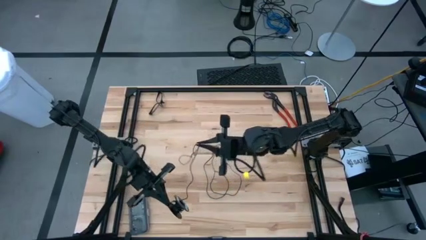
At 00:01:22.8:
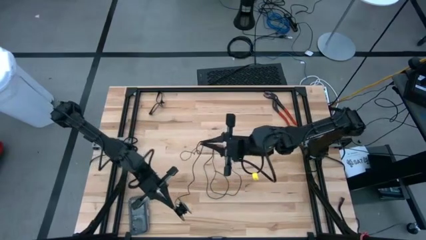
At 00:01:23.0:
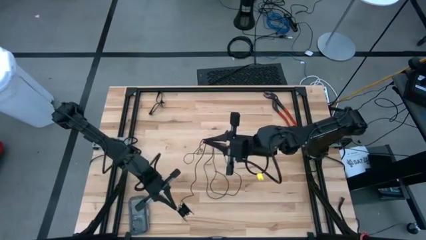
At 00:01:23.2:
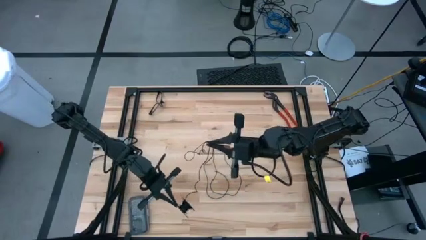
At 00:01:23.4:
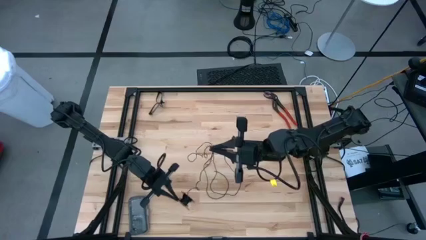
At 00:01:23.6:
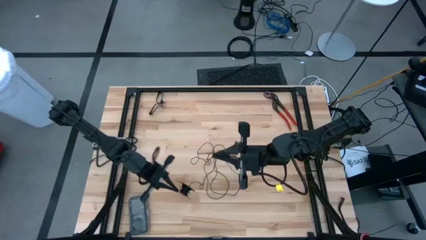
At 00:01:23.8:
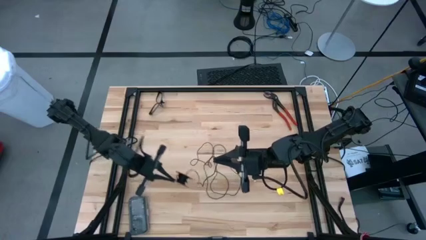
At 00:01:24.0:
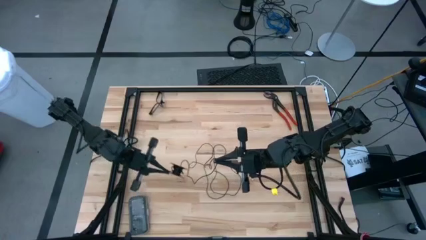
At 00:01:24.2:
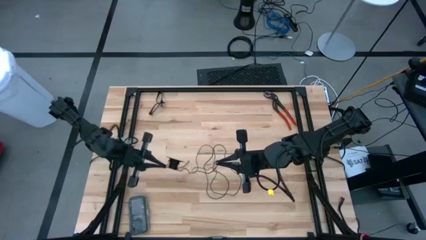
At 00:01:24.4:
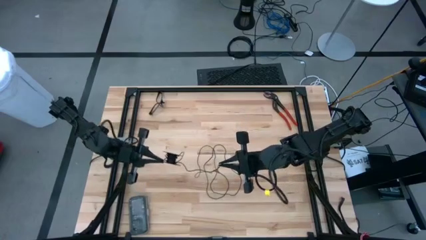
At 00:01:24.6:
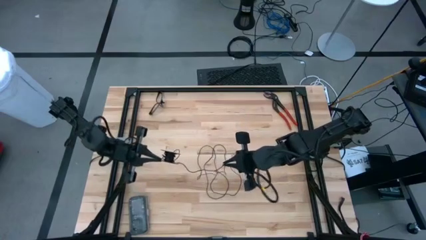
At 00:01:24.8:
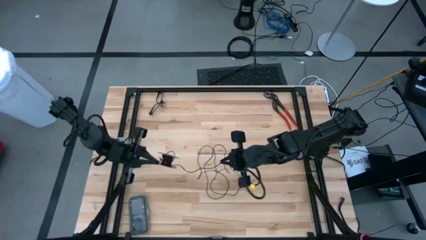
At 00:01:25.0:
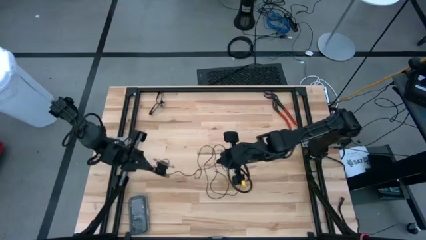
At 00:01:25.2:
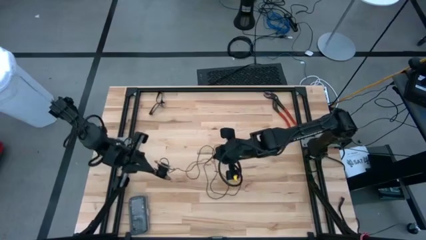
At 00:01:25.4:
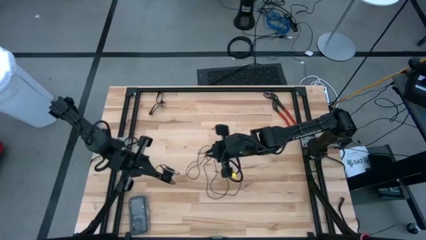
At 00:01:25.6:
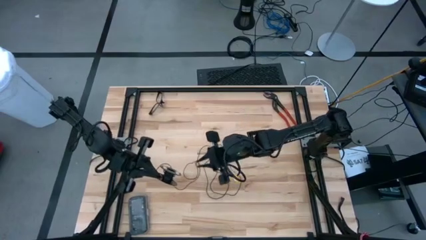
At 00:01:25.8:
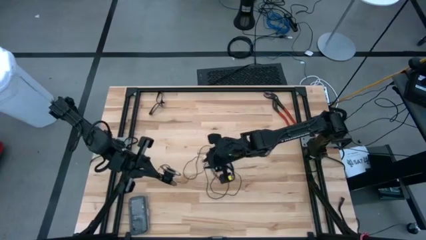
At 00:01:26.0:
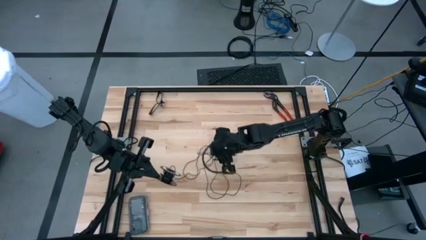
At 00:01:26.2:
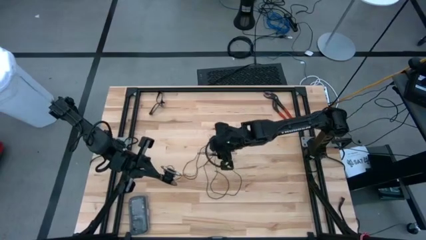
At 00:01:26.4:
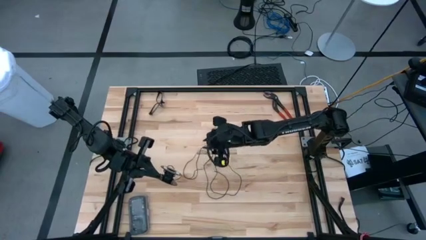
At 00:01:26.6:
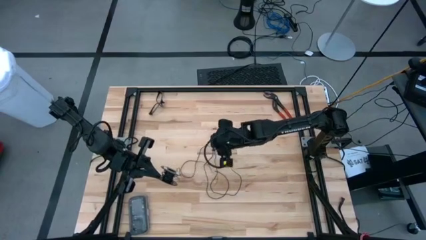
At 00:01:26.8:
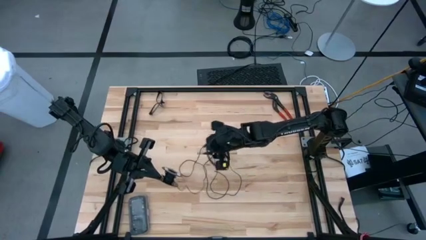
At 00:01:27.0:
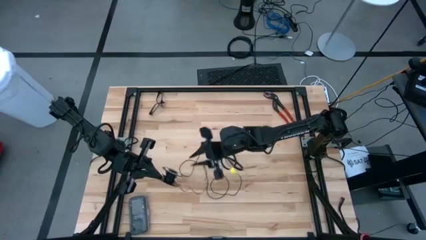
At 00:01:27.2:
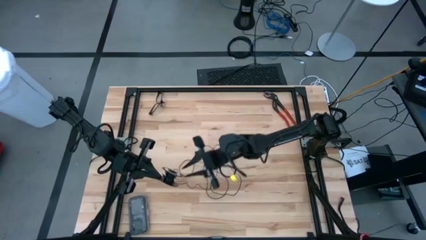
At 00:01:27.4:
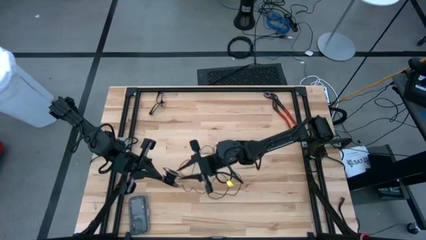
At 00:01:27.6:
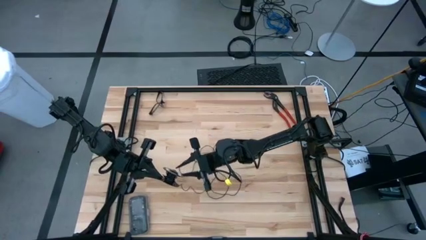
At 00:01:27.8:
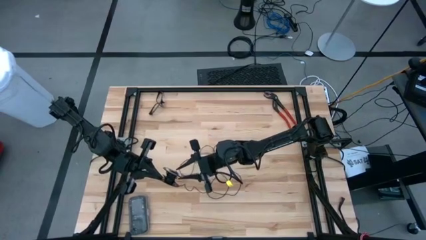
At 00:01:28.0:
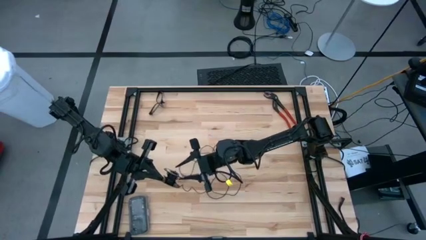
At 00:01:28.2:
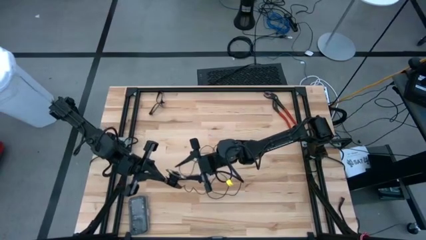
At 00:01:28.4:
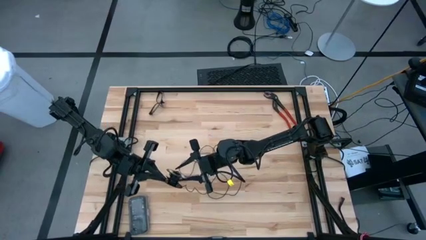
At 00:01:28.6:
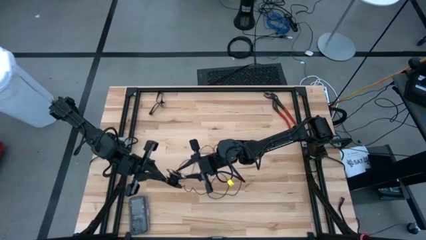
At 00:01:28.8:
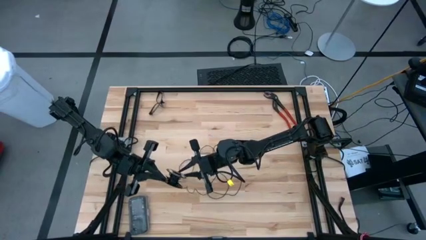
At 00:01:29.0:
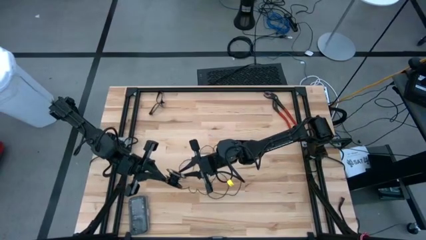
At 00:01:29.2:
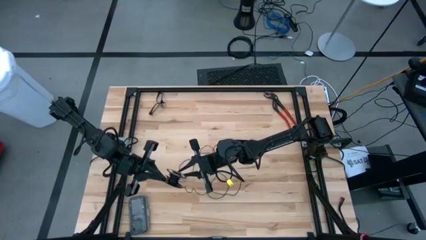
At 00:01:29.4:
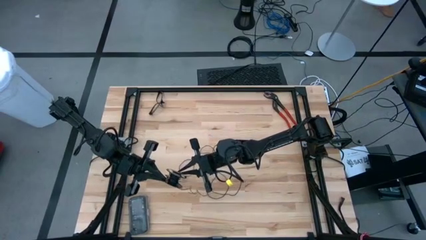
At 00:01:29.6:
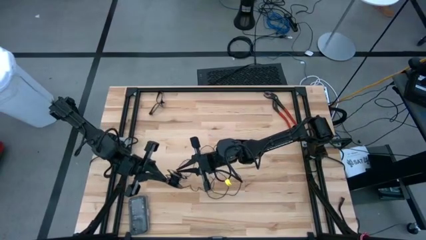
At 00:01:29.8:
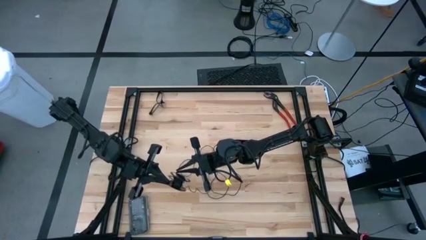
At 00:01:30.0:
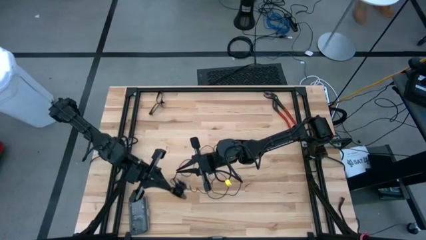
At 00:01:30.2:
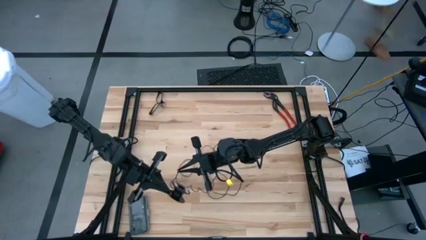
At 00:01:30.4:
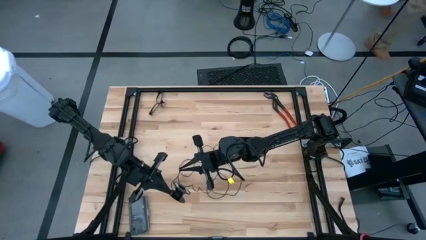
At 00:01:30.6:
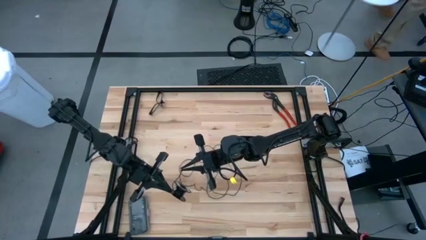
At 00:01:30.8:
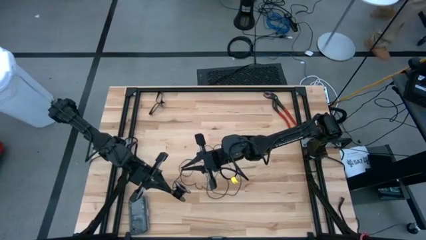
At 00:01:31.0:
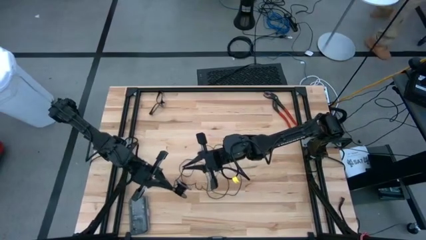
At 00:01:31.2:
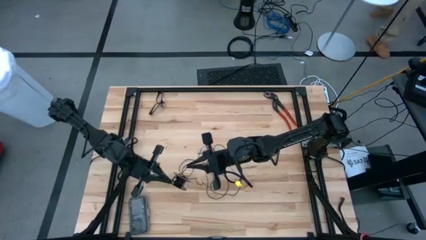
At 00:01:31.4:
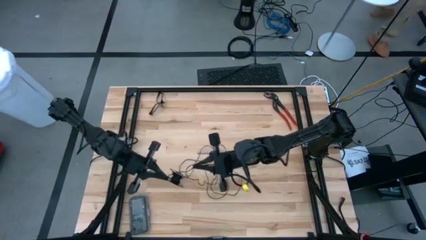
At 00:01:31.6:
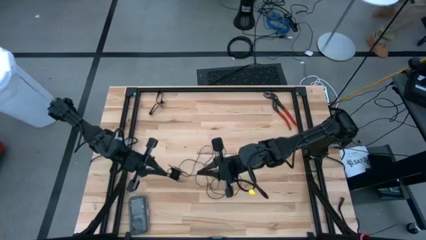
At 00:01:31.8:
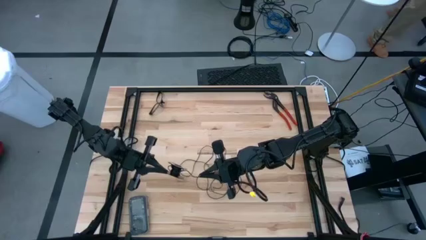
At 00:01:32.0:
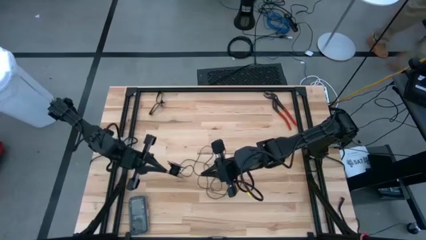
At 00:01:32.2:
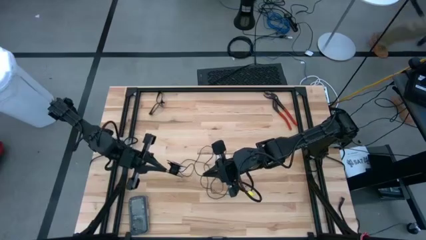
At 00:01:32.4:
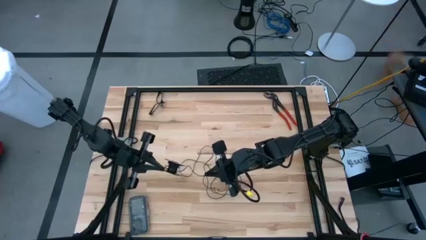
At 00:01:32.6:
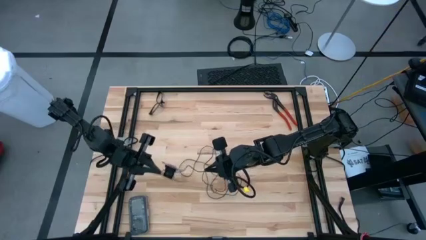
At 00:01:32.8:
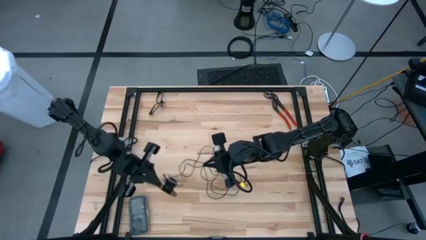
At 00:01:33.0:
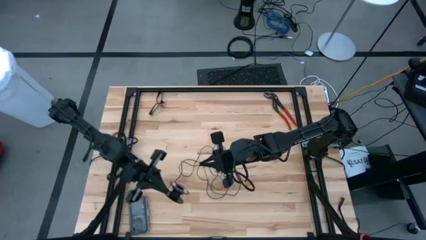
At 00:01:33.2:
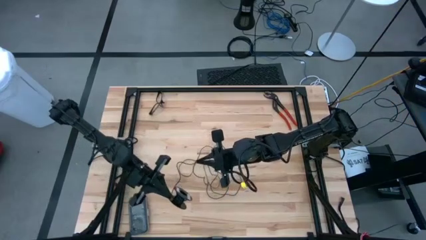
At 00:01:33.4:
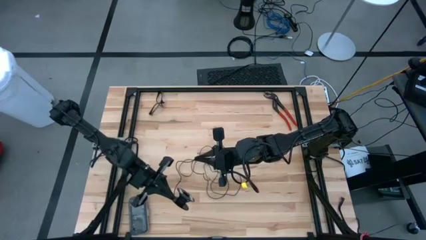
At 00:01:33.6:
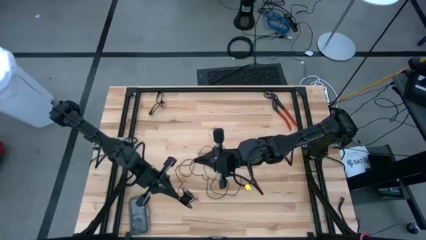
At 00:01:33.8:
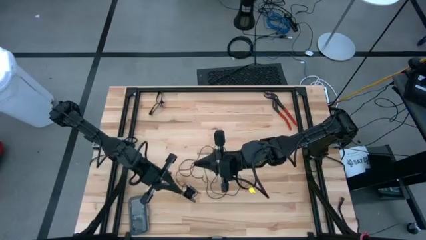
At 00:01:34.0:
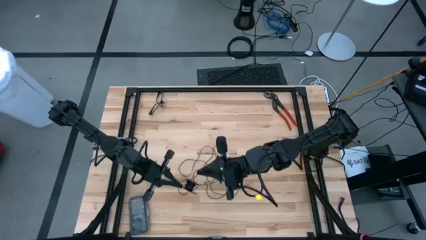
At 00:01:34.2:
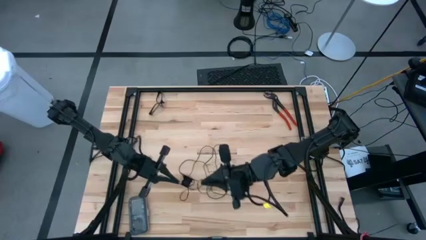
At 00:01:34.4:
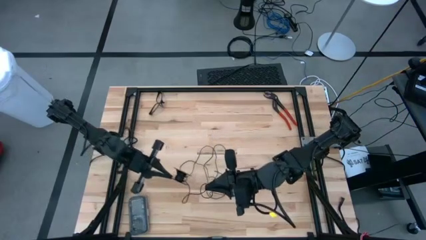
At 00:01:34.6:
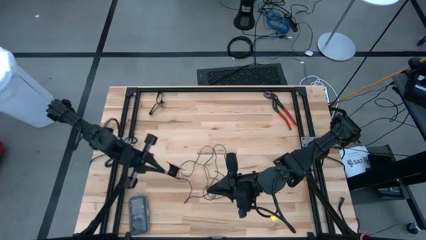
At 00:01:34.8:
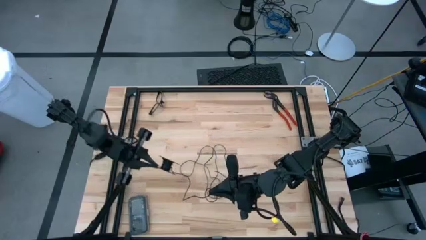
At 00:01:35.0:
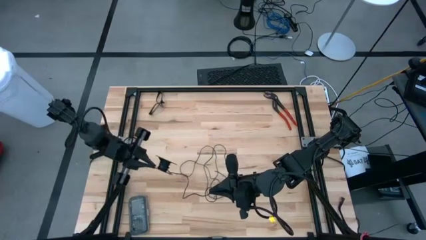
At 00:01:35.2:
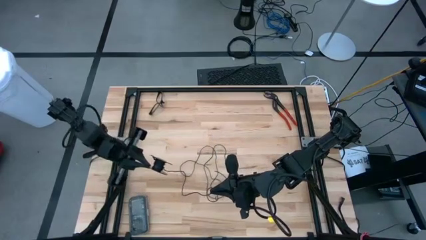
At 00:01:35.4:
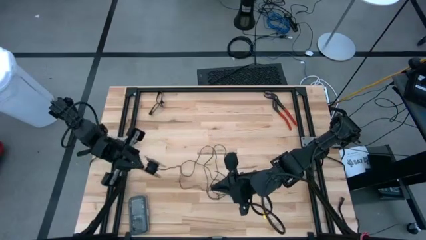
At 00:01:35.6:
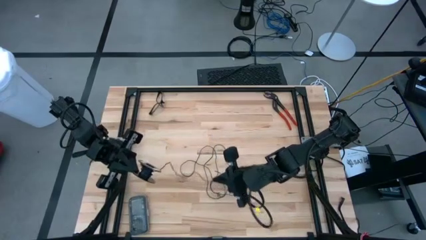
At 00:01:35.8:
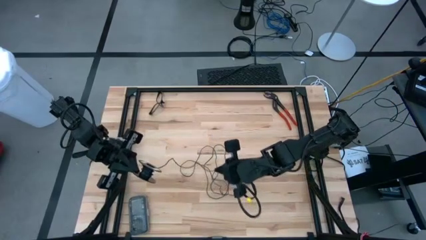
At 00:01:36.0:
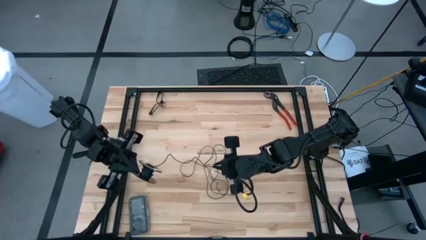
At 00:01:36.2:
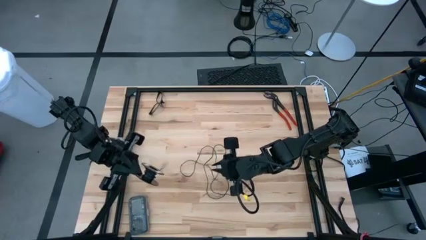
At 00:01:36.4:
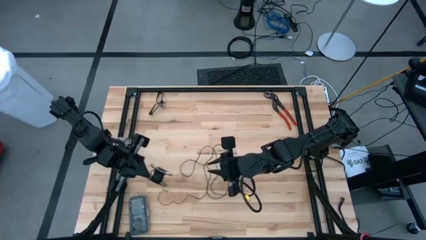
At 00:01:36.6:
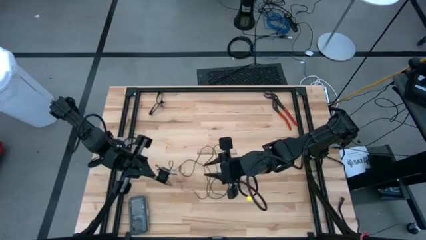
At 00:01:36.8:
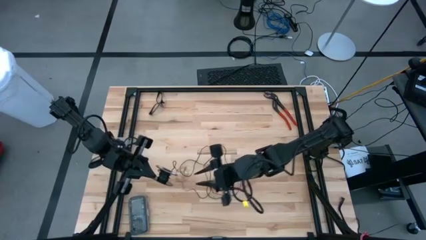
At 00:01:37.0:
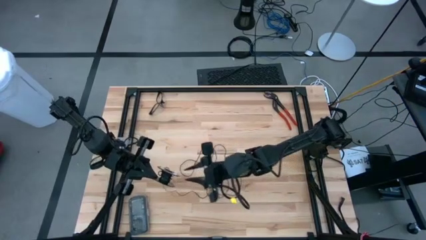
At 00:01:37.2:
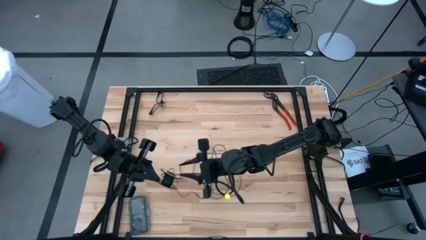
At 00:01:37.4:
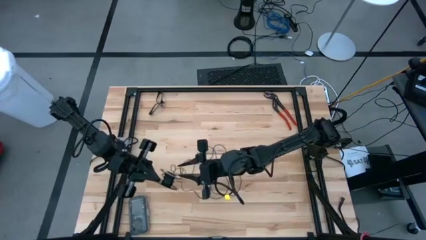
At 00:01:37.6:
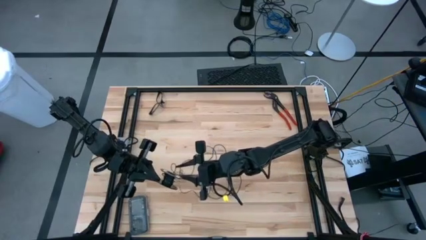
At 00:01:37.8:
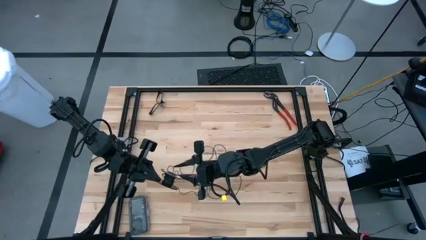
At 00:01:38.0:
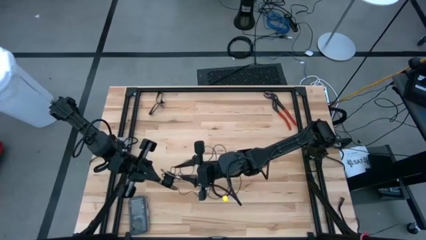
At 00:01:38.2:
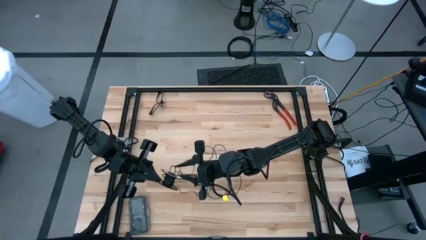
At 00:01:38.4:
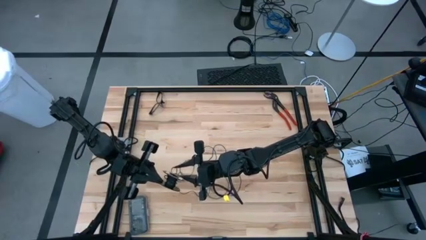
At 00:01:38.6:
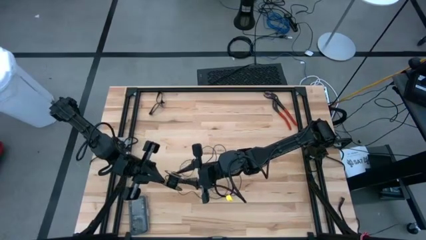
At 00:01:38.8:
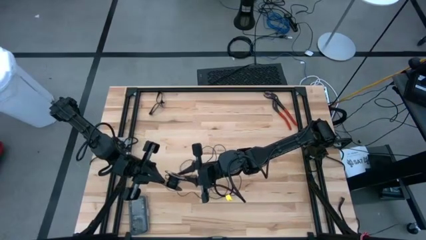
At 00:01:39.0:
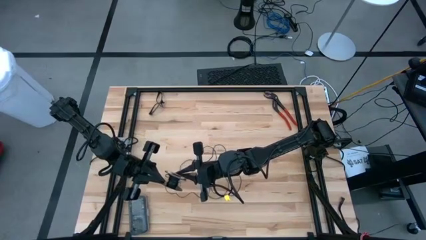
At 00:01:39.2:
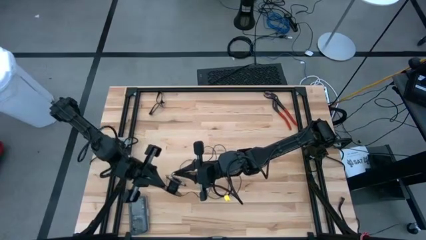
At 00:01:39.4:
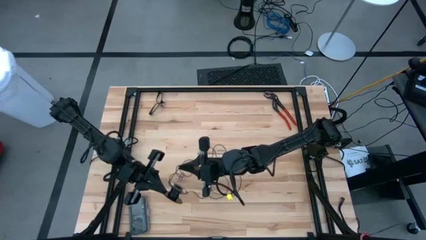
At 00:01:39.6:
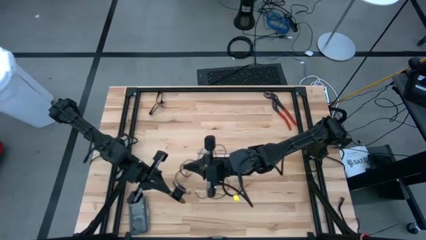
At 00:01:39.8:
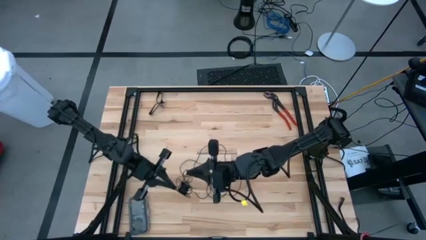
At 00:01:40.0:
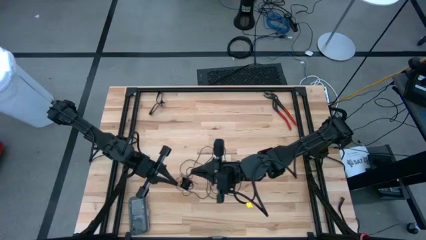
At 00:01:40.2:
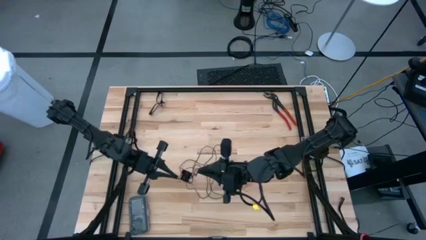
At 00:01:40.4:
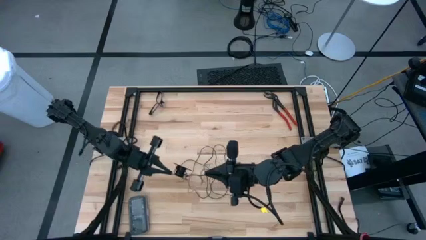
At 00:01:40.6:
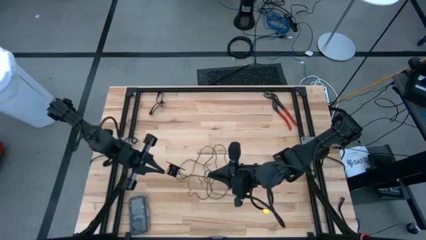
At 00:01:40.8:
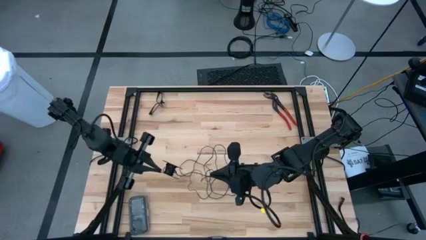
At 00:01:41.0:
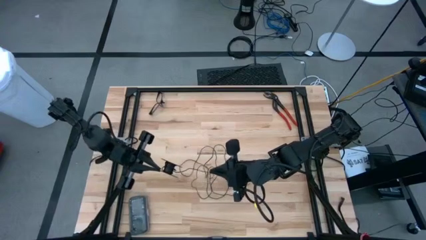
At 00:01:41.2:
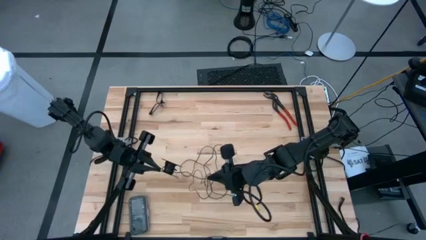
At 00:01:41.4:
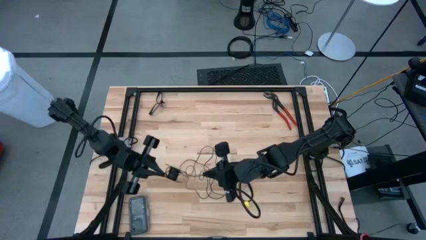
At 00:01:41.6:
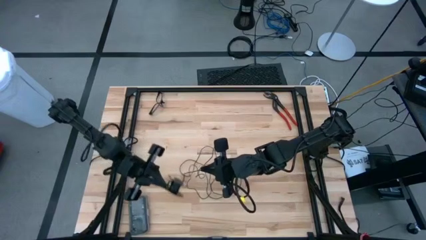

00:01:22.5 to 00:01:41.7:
Task: Coil cords
Uncoil the black cable wire from the spool
